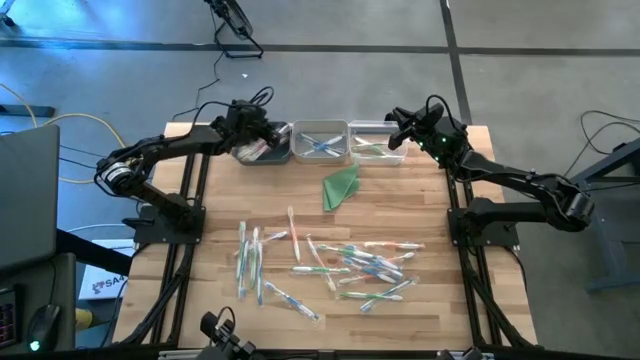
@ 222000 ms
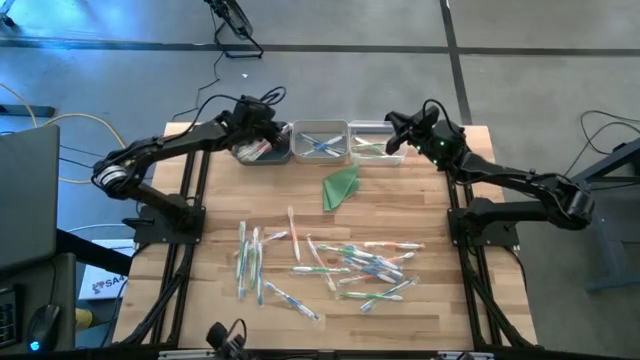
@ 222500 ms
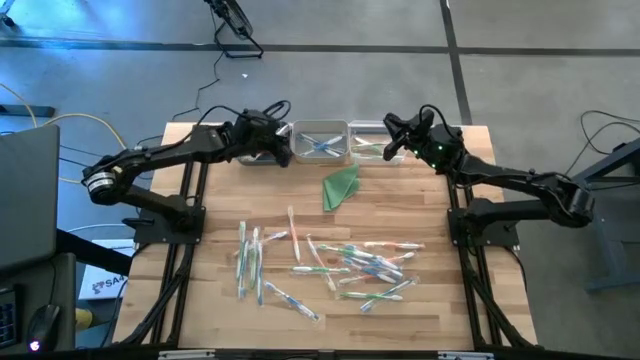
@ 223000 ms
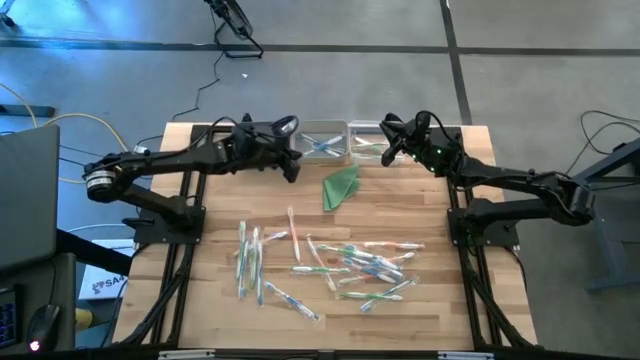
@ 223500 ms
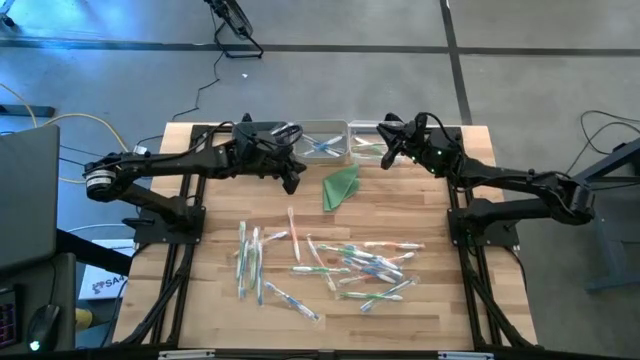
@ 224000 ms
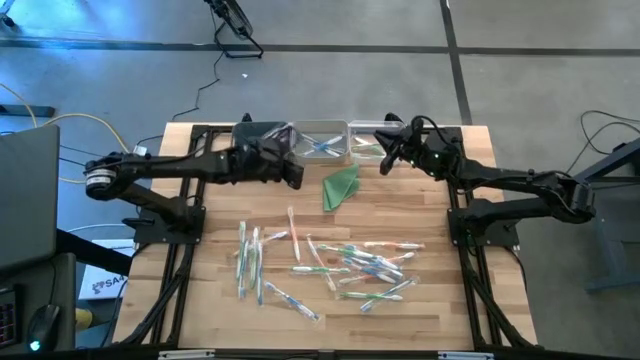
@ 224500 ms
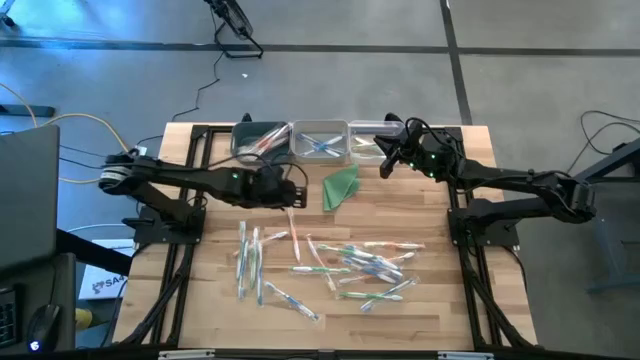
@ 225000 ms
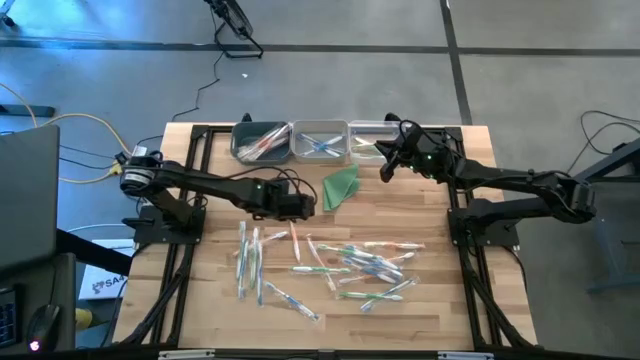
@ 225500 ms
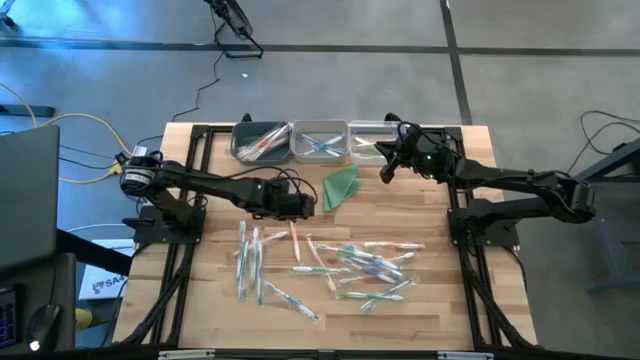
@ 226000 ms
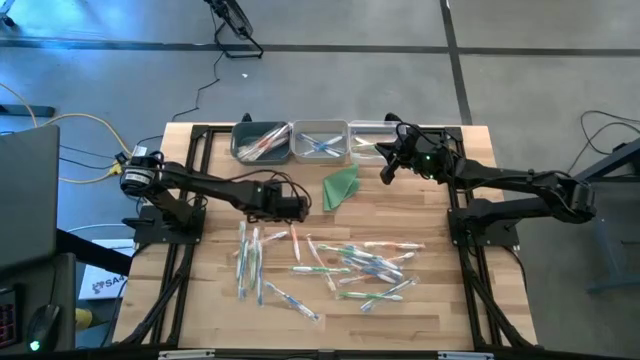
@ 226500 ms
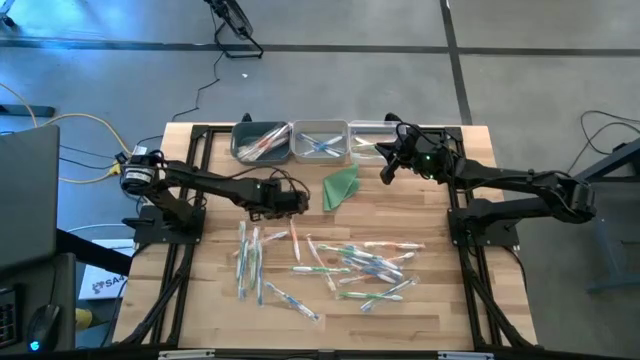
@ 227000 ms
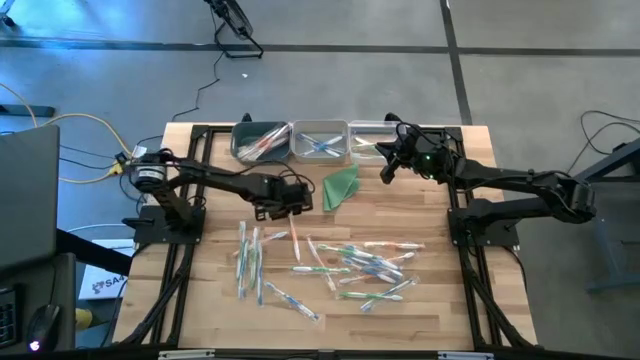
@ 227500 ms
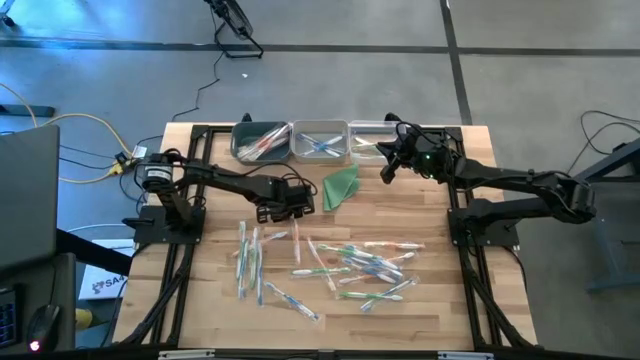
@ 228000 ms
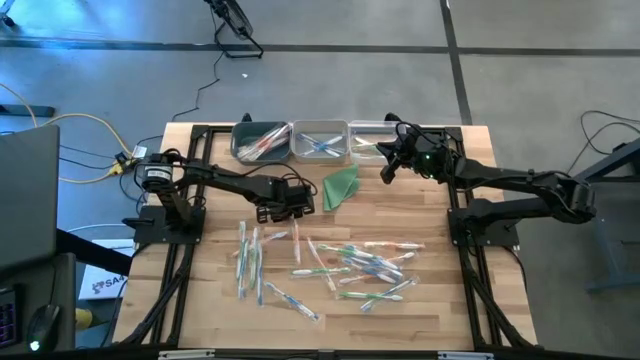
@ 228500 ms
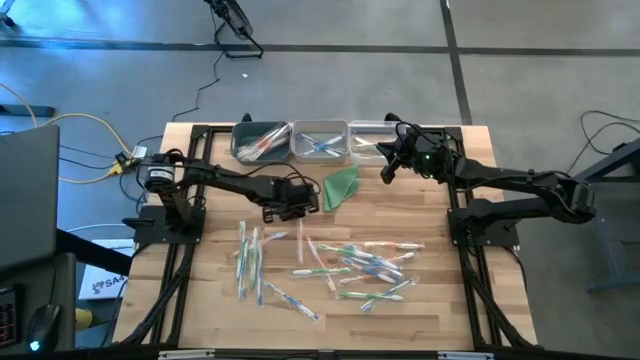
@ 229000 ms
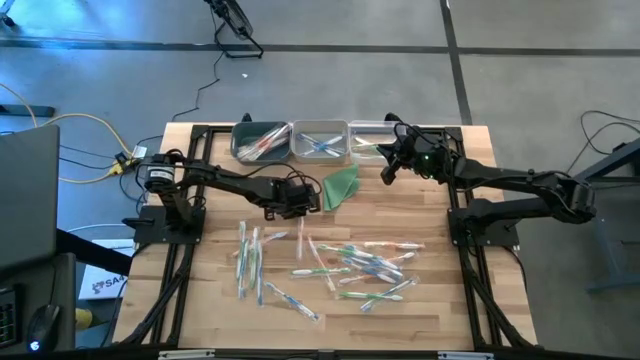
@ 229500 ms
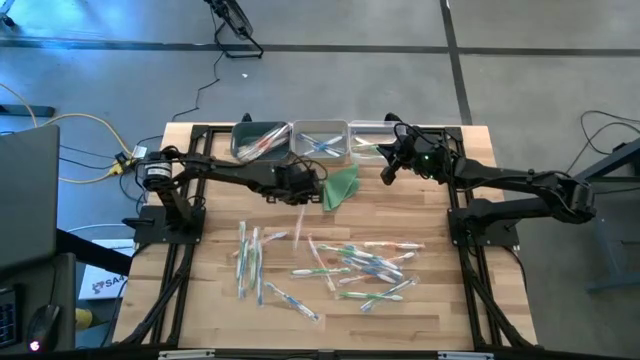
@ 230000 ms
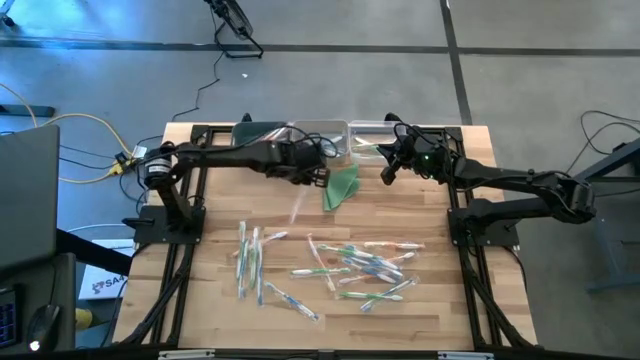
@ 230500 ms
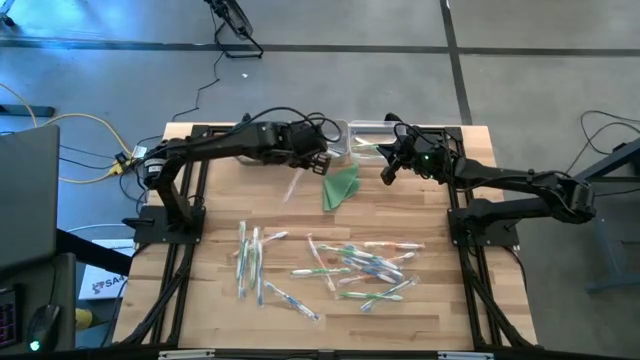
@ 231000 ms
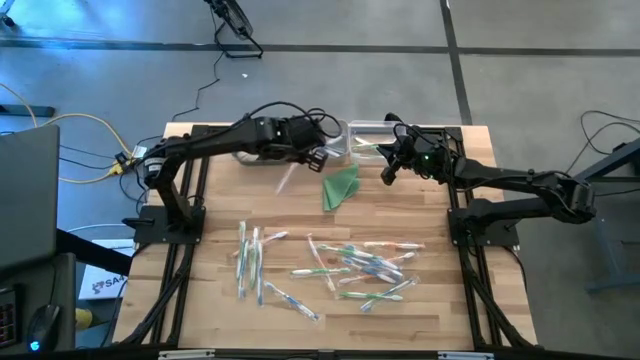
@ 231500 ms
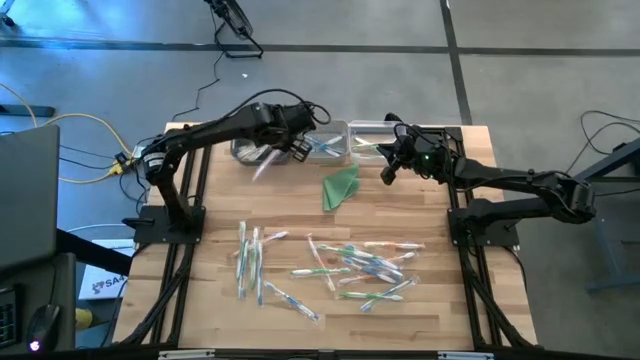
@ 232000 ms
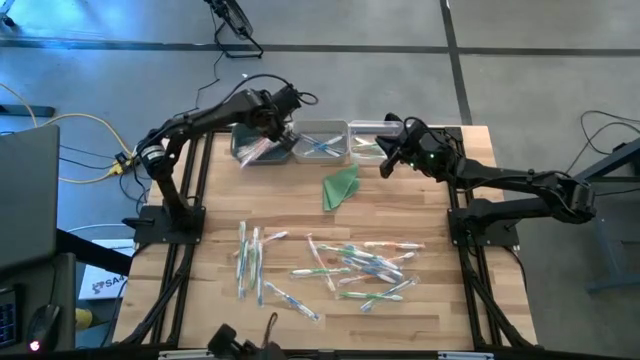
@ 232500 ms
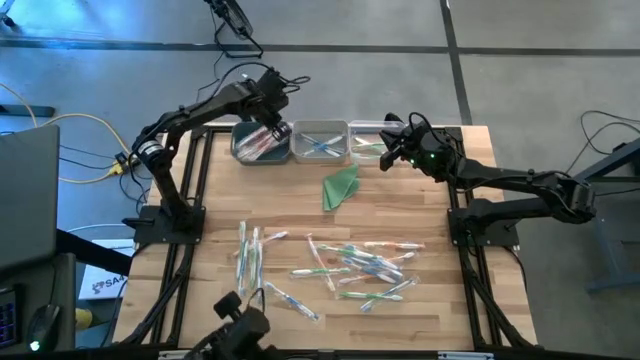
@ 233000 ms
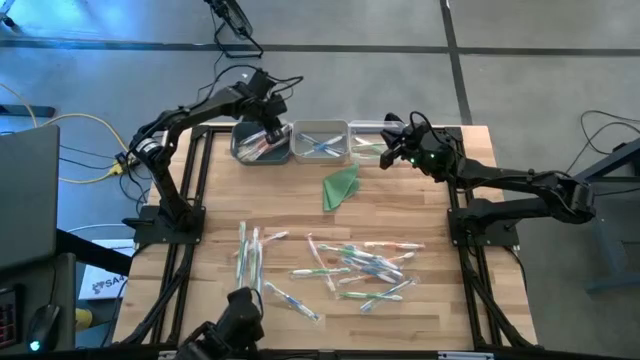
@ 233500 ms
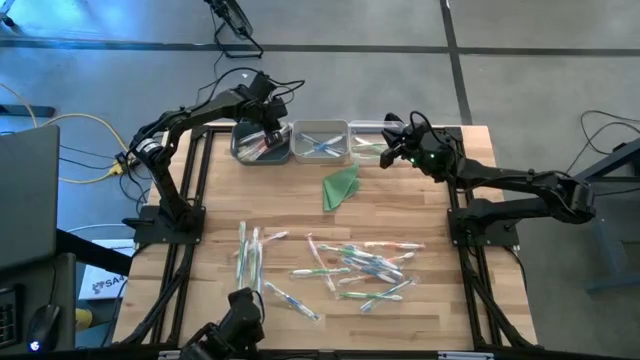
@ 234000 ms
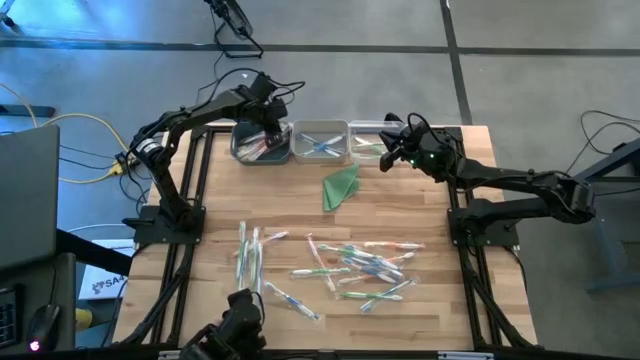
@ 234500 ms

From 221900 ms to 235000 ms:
Task: Pick & Place Toothbrushes
Put the orange toothbrush into the dark blue bin

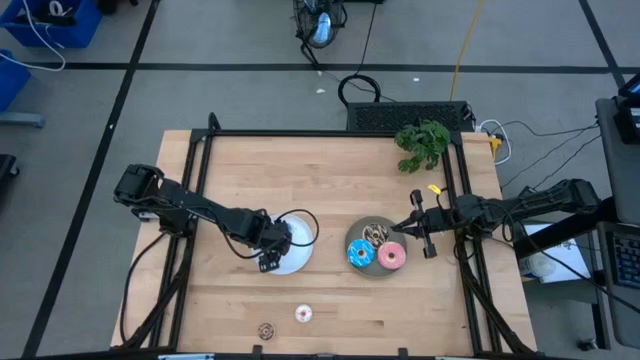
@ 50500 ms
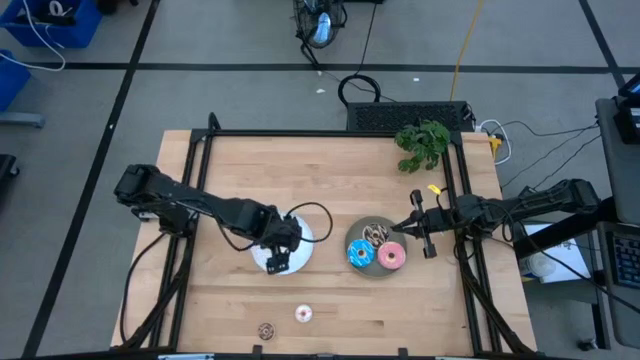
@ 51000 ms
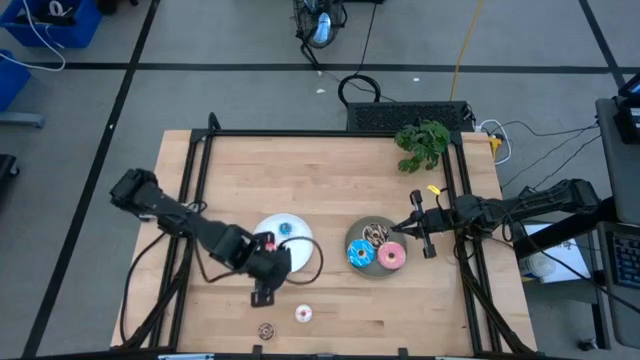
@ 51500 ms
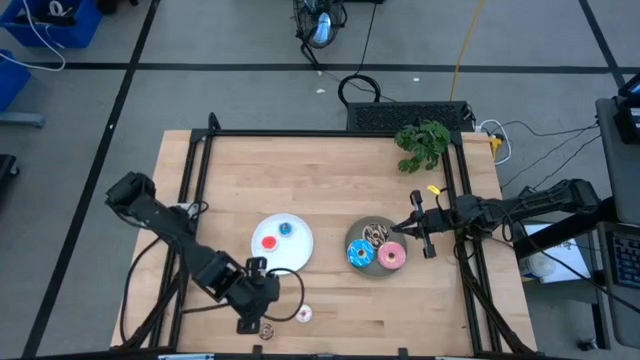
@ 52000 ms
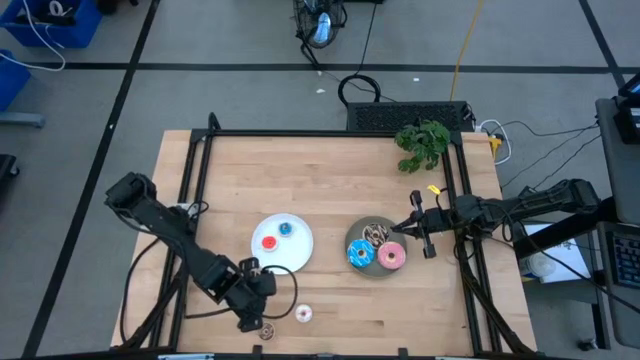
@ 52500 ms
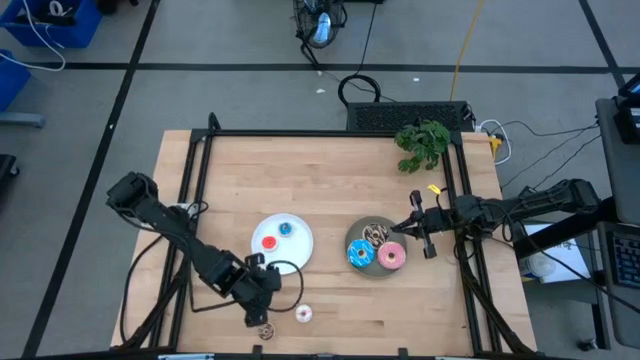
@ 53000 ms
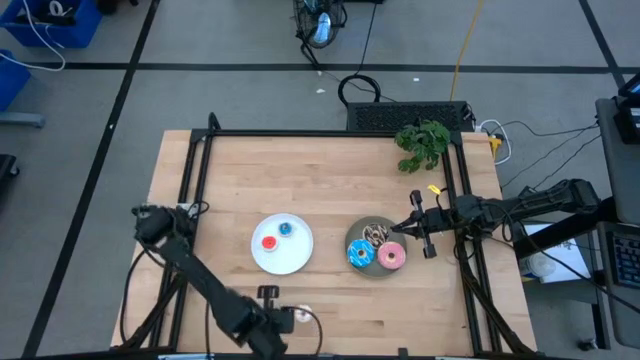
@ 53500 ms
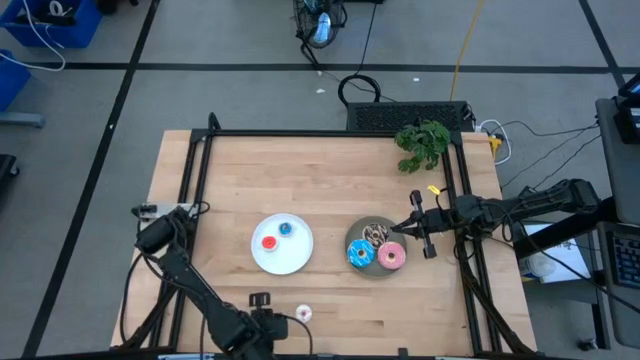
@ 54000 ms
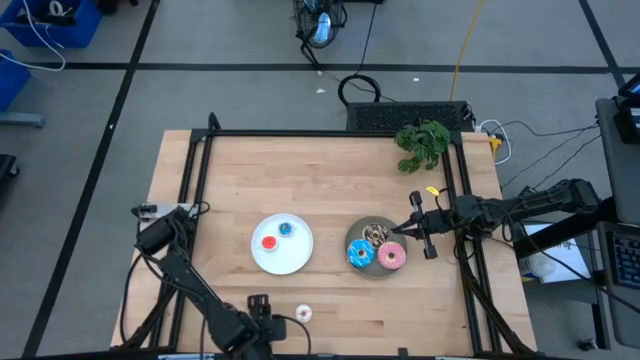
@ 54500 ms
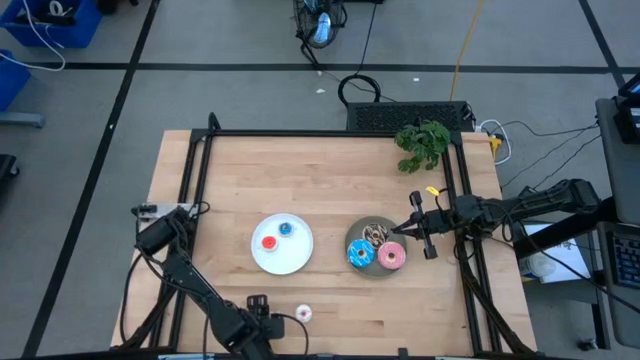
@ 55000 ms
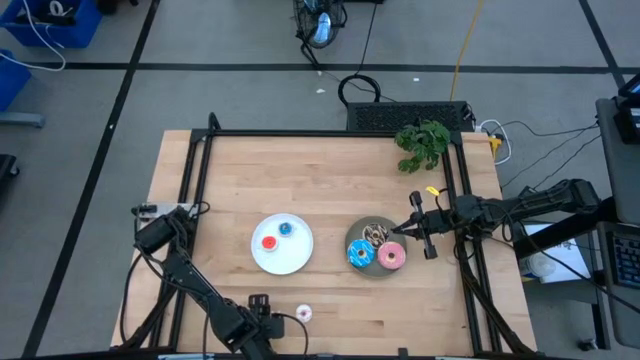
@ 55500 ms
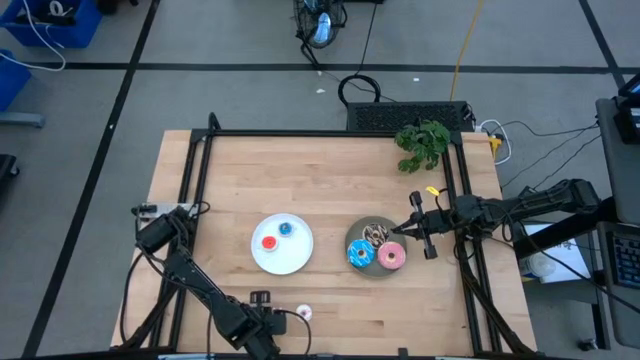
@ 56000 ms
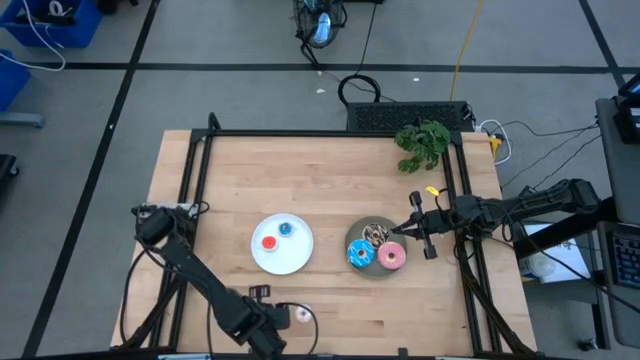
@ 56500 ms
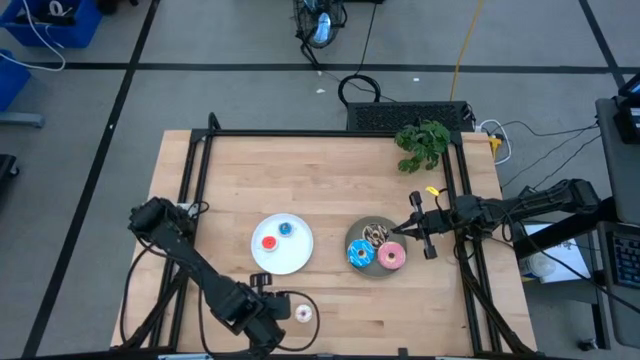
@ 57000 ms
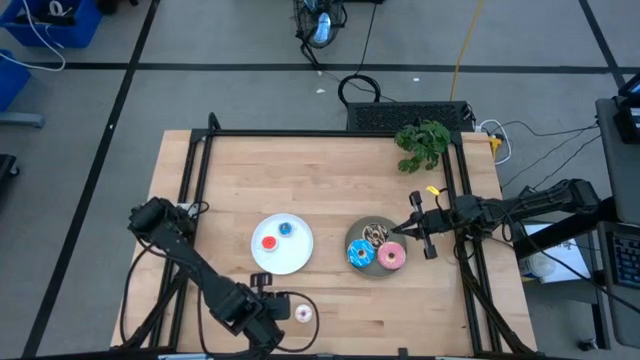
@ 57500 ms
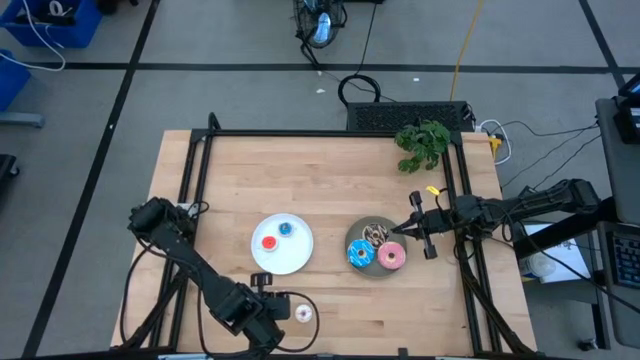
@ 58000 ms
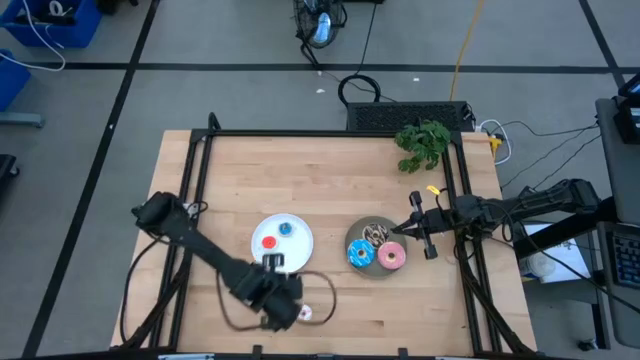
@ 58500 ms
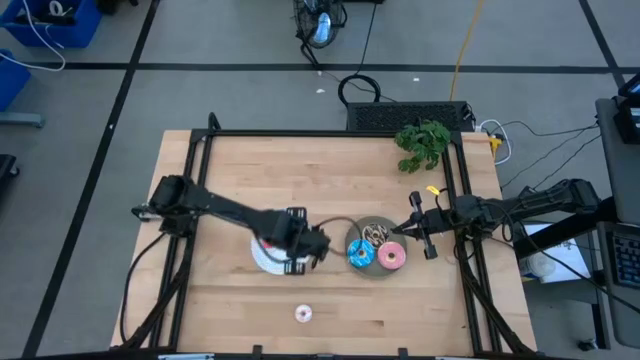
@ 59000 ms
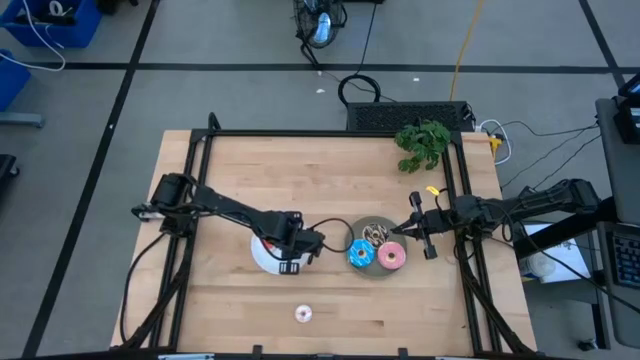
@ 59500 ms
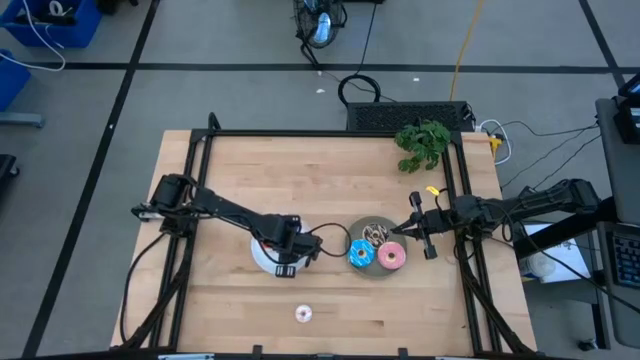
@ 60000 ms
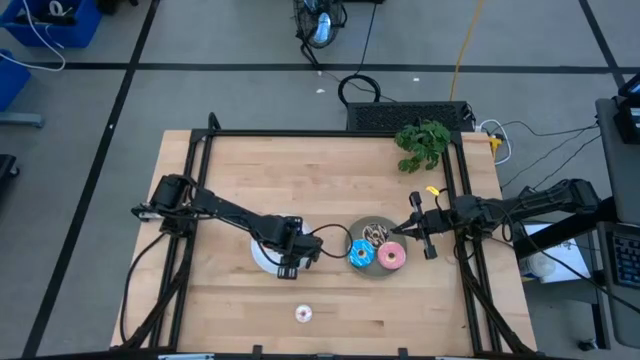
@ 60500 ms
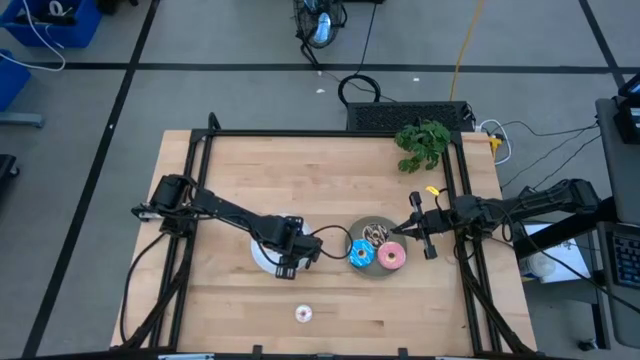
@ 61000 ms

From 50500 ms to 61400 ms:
Task: Pick & Place donuts
Put the small brown donut on the white plate
